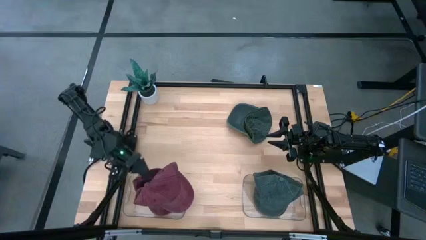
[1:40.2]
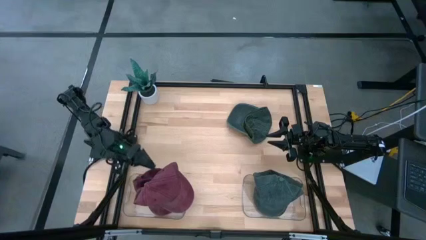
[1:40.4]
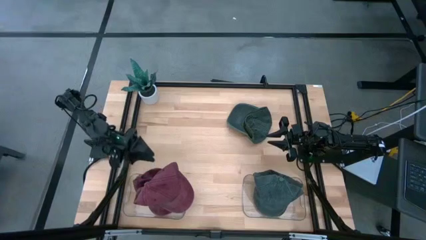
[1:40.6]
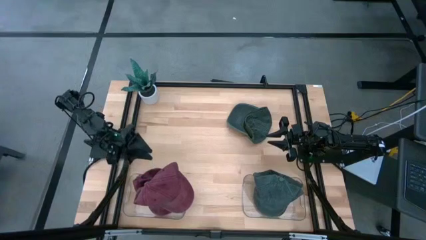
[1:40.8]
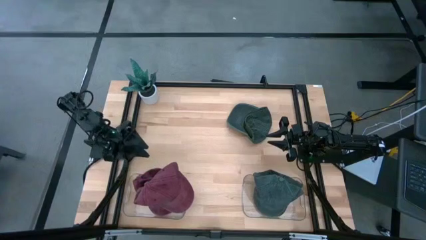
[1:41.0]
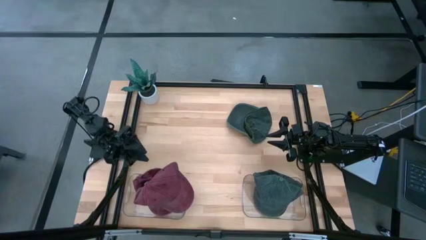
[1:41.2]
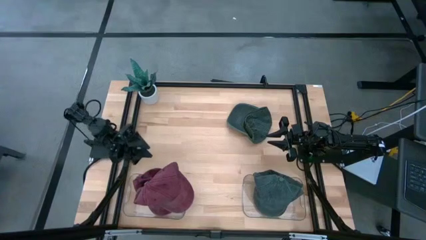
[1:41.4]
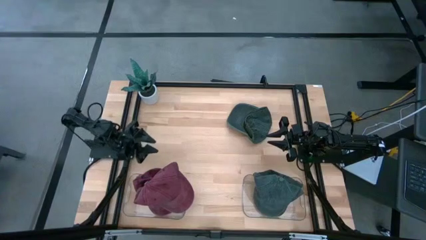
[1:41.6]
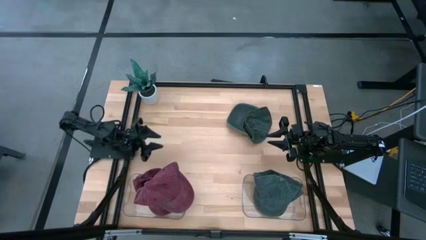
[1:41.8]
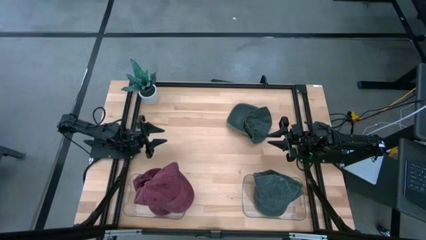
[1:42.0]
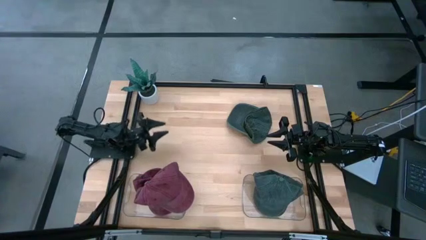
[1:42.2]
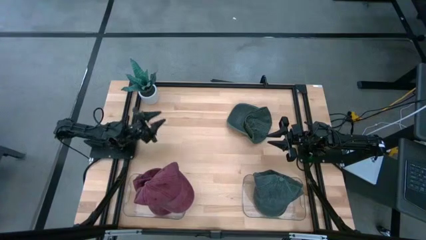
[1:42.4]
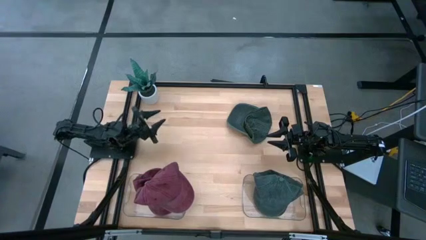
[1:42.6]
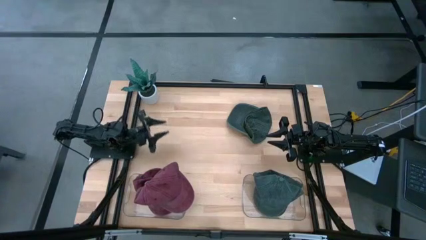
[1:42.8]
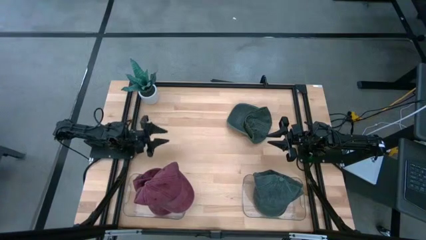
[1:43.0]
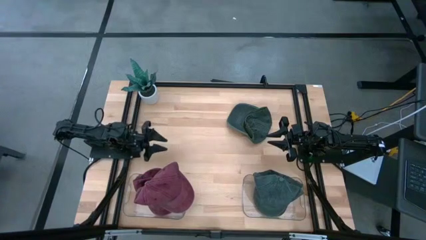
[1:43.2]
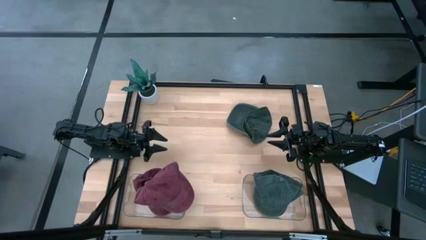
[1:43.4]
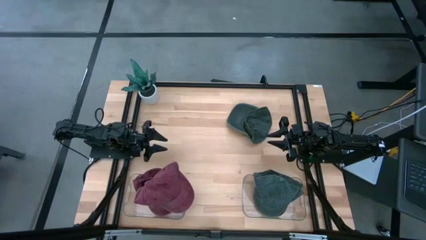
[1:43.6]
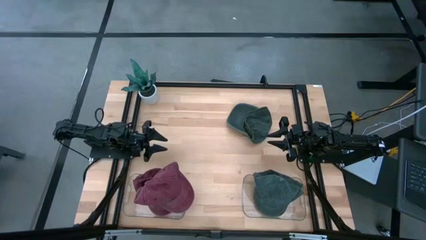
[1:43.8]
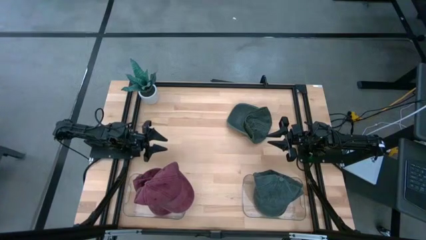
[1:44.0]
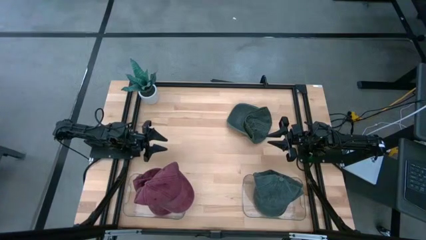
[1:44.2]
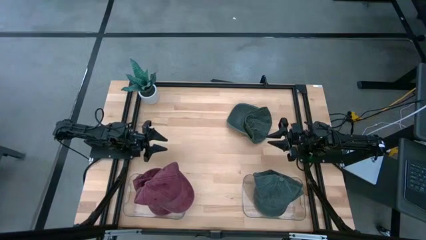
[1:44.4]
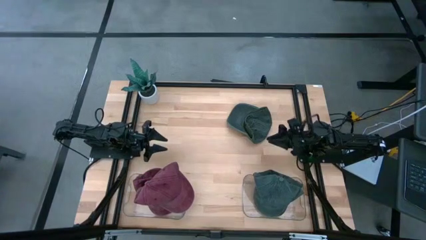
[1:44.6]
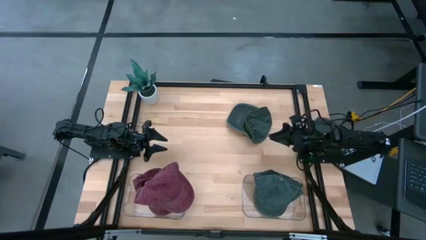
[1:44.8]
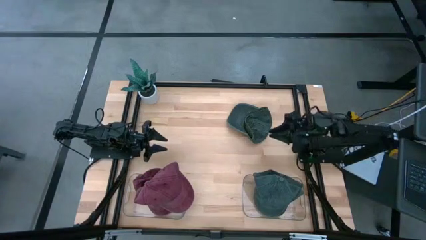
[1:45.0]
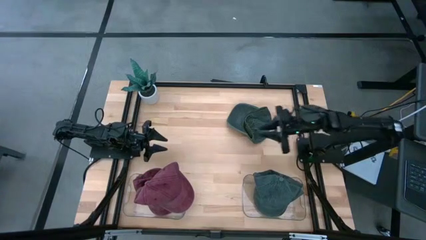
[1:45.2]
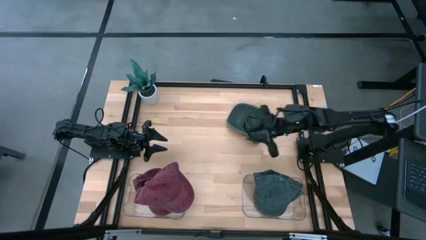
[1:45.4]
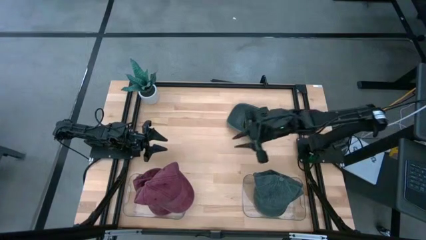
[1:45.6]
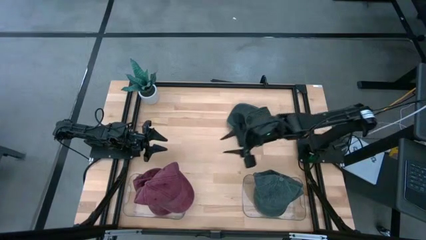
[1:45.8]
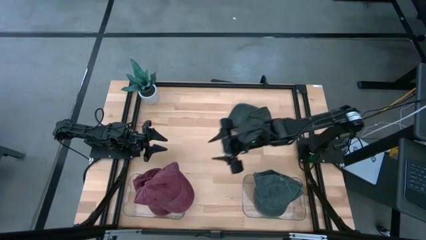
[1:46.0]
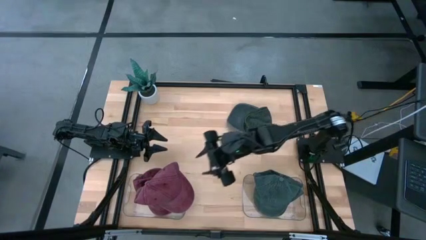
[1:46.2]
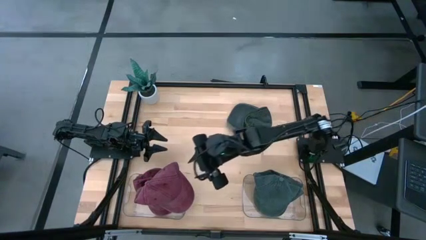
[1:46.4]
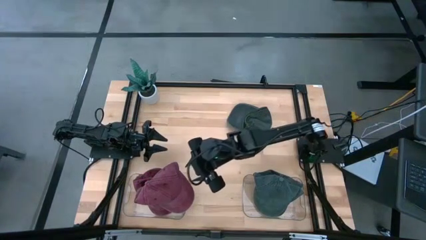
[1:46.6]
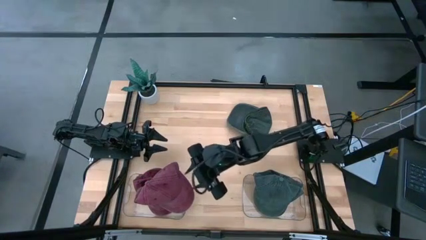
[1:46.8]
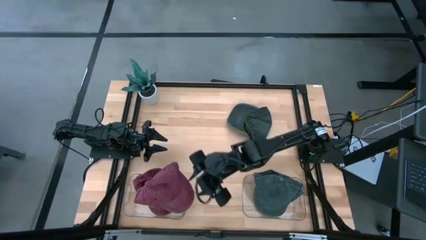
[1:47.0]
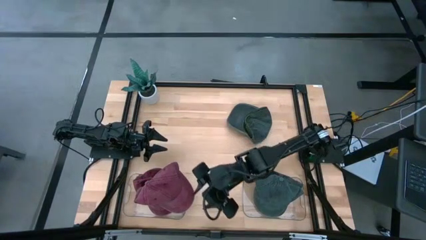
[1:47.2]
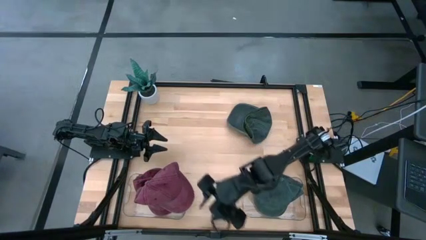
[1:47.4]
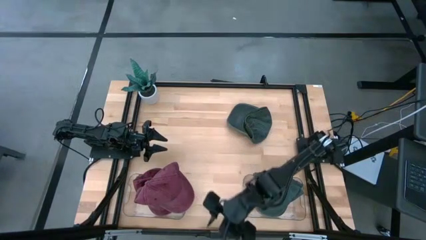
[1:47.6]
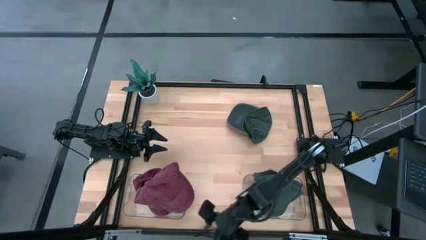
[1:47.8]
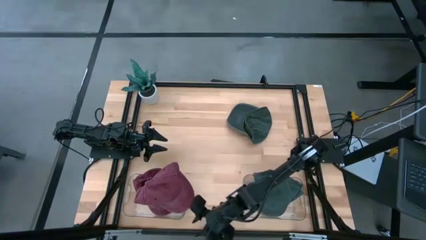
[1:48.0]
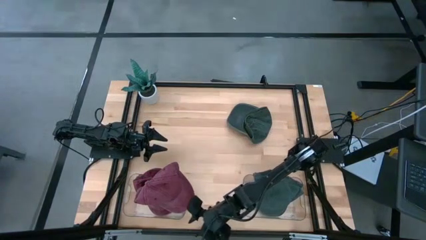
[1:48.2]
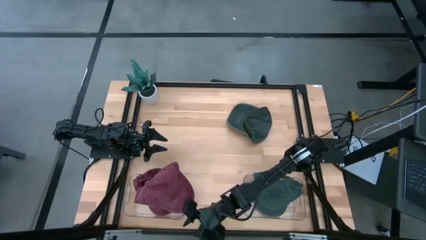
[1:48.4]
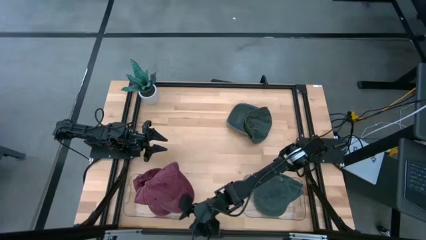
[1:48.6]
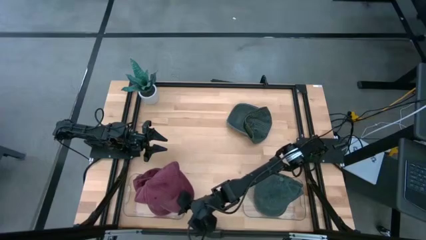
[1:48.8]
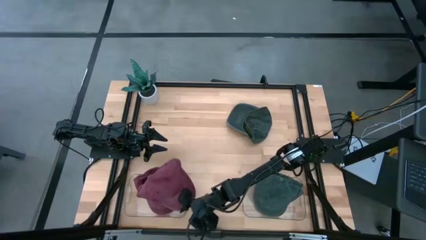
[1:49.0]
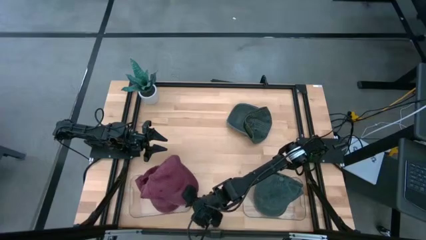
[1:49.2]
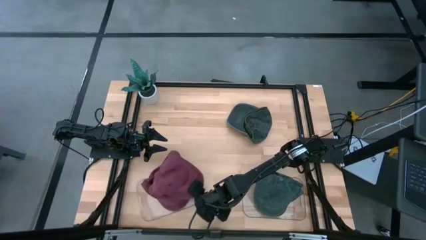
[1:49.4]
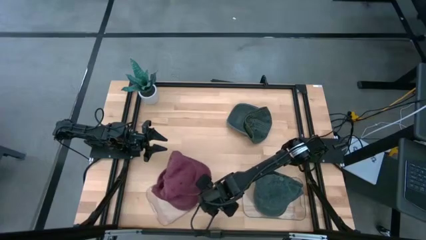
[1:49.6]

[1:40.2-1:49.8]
Task: Pick & Place hat
Adjust the left transparent bin

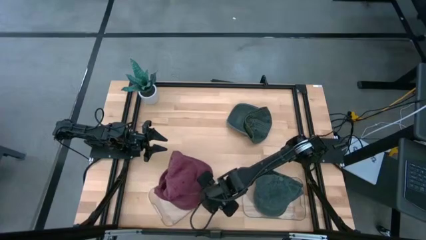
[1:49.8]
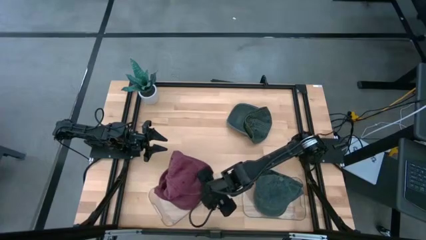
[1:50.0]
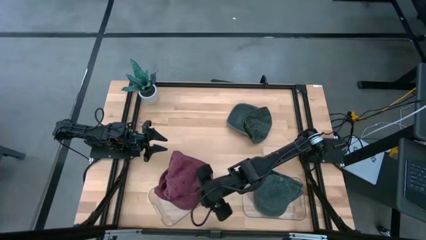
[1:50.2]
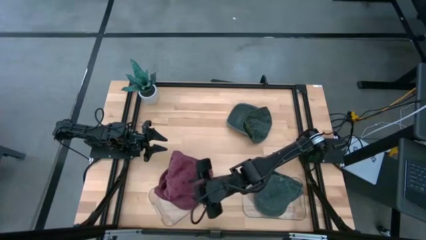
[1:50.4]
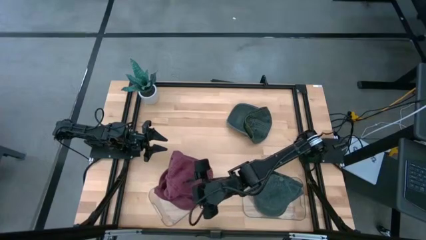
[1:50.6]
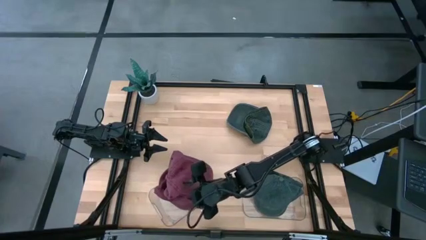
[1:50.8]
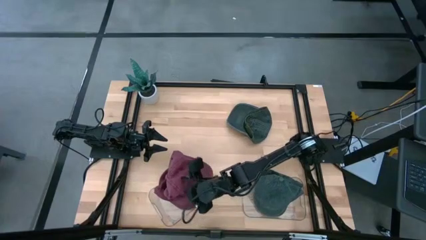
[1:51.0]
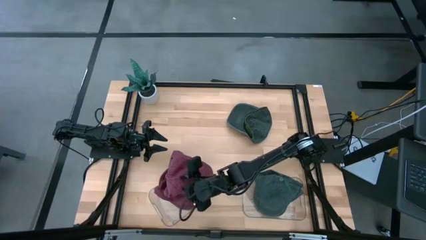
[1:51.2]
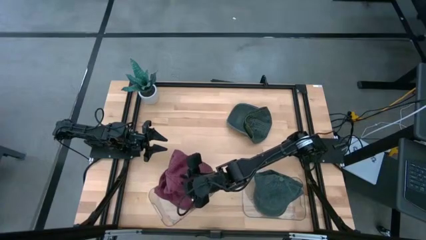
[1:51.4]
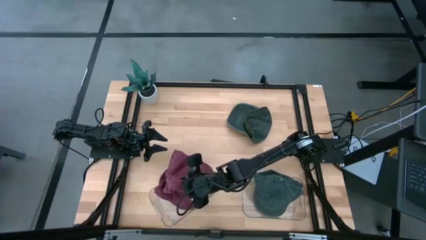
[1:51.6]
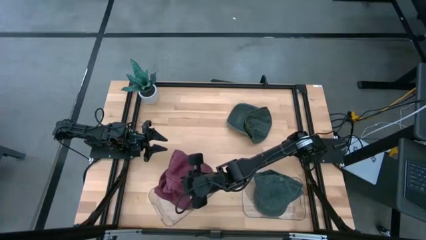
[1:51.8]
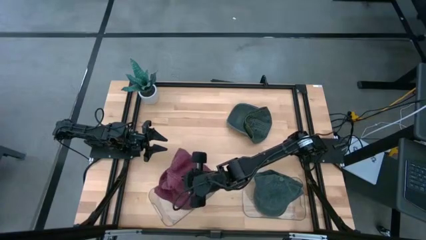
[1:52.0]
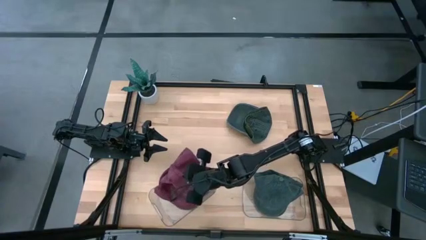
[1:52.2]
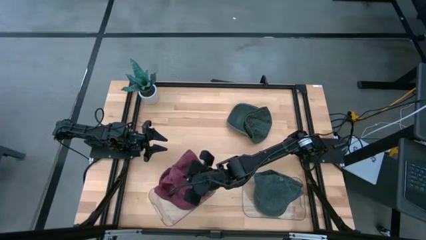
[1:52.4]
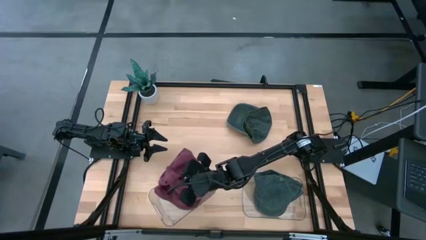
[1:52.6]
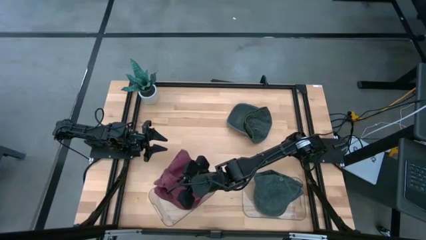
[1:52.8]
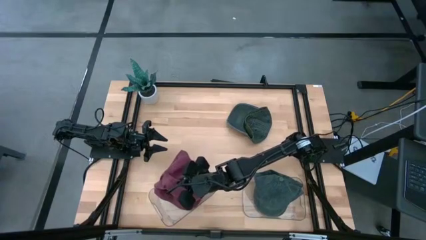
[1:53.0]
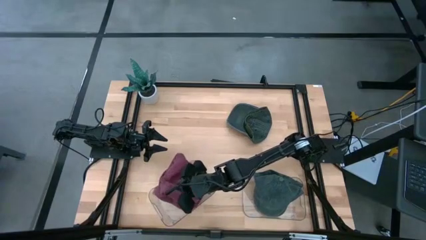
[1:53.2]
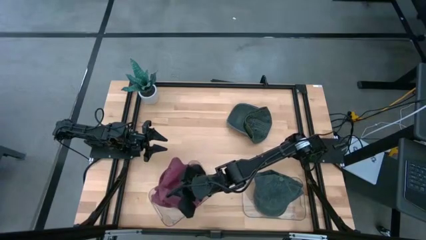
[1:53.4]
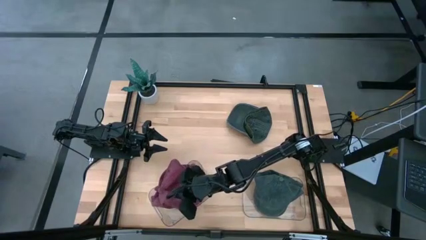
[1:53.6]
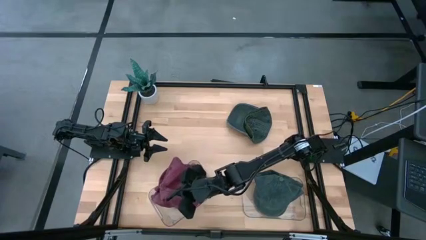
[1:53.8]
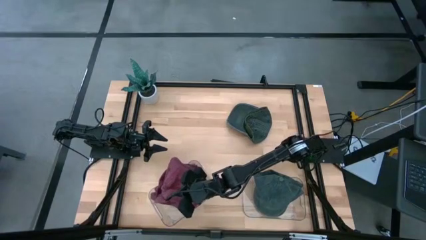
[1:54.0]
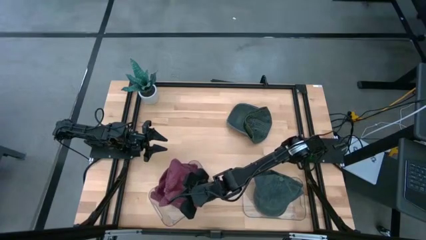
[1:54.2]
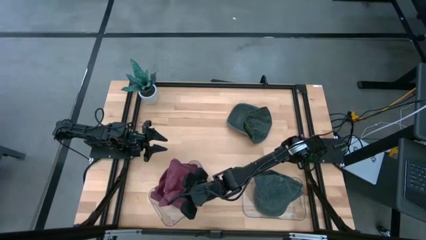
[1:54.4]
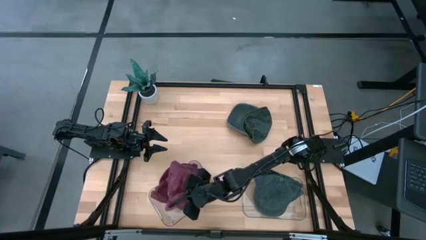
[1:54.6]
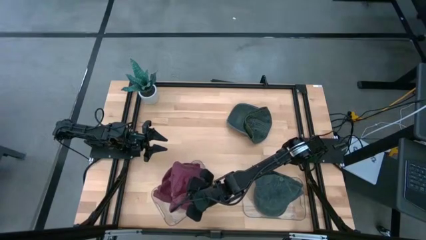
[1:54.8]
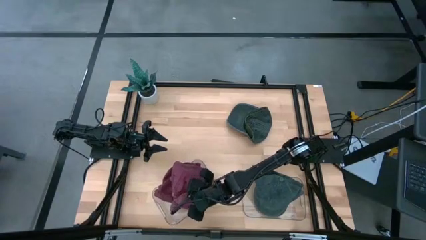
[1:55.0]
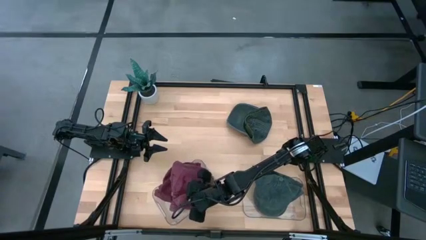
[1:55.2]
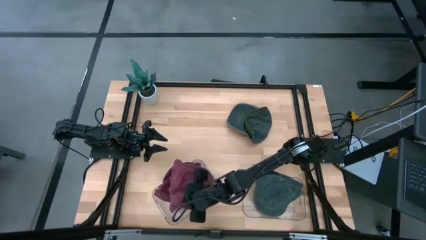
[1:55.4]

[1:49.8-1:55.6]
Adjust the red cap in the left transparent bin

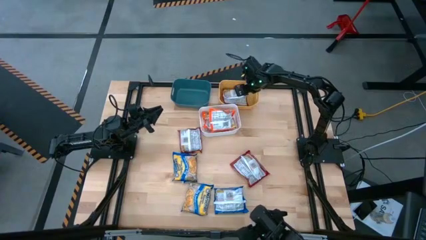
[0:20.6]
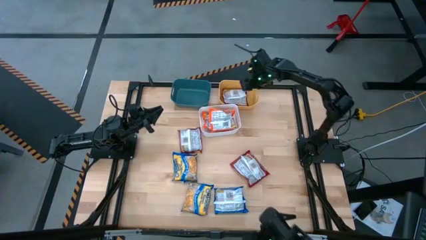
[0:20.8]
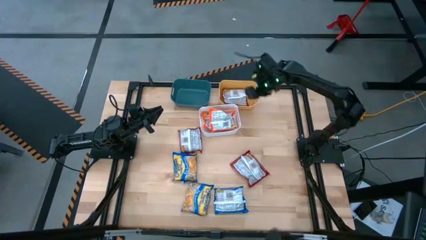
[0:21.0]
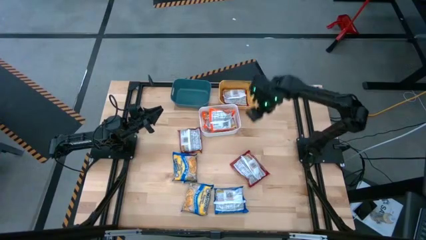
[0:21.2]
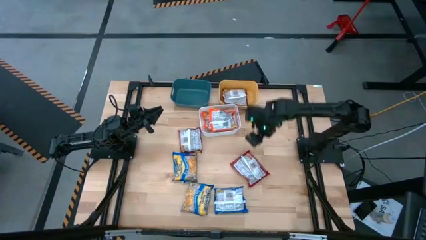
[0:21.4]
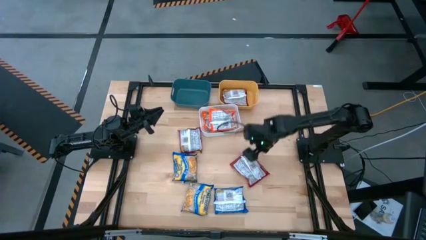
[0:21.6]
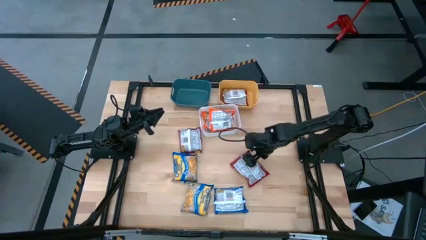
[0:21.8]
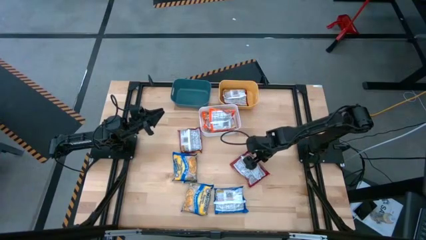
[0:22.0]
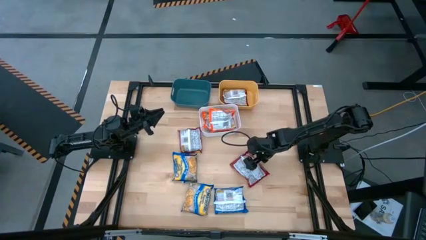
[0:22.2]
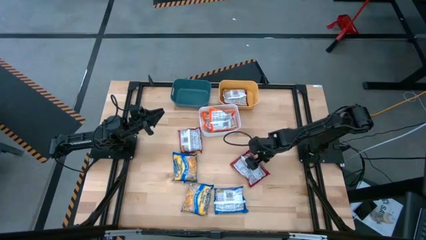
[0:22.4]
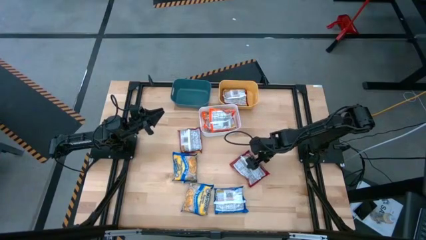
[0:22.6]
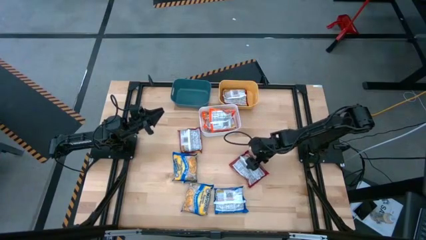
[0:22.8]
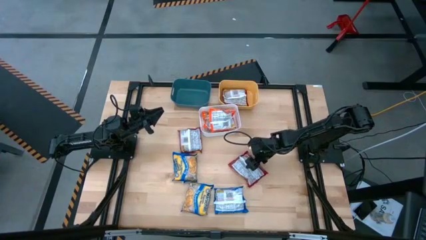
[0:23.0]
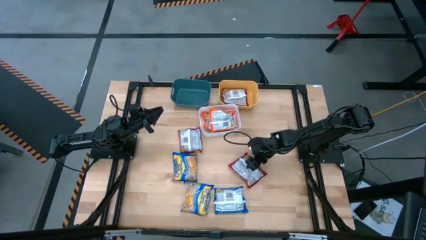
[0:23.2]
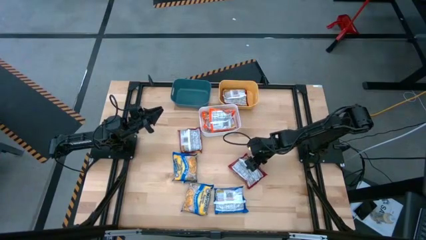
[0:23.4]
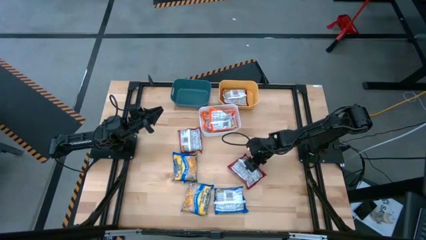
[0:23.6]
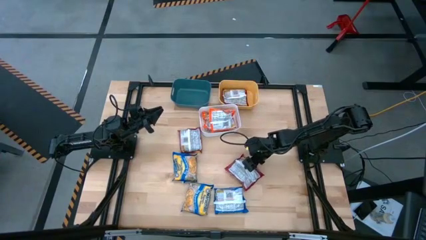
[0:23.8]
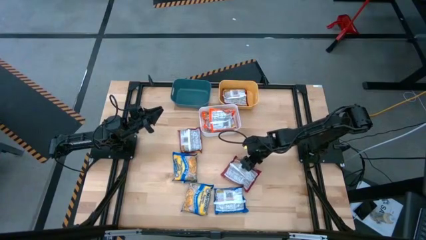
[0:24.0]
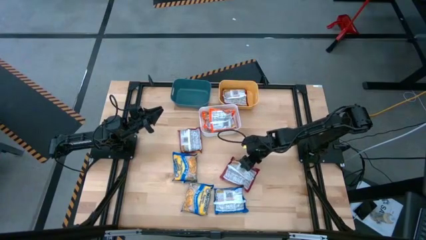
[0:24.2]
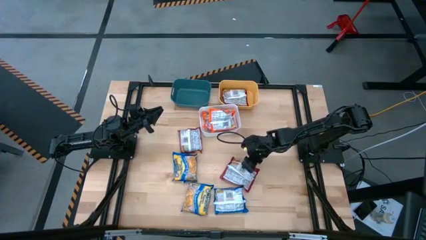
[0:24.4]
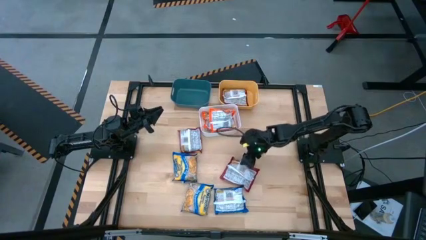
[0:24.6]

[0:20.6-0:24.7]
Task: Sort Maruchan noodles
Put the bottom red noodle pack into the yellow bin
